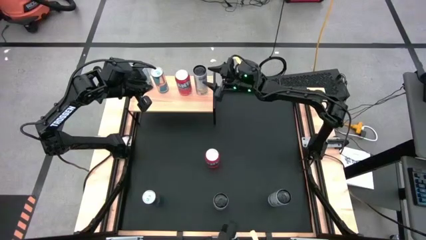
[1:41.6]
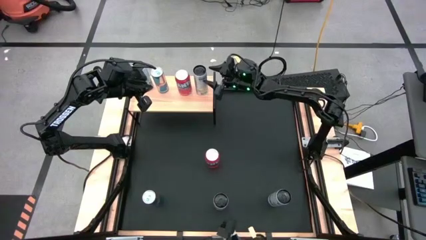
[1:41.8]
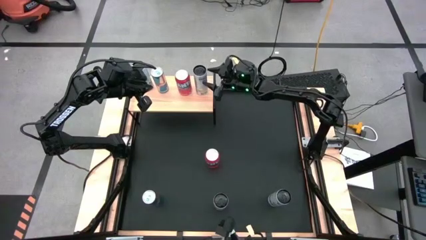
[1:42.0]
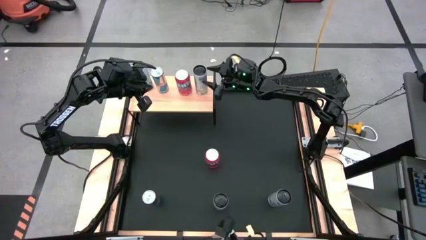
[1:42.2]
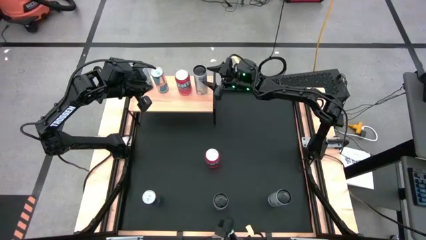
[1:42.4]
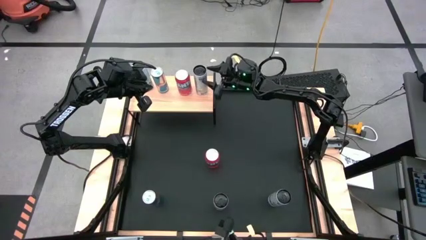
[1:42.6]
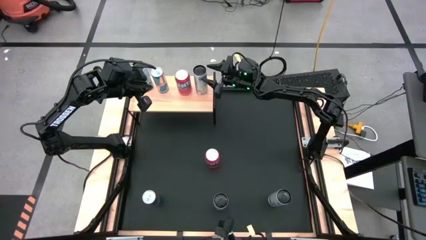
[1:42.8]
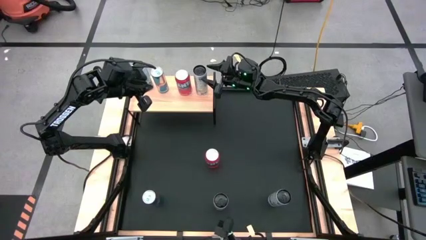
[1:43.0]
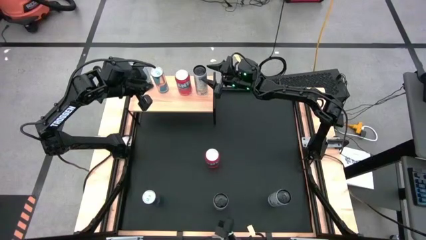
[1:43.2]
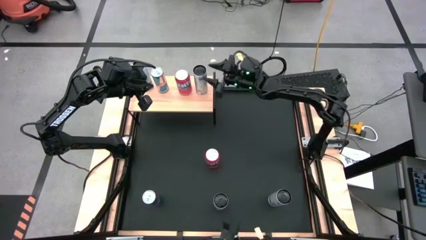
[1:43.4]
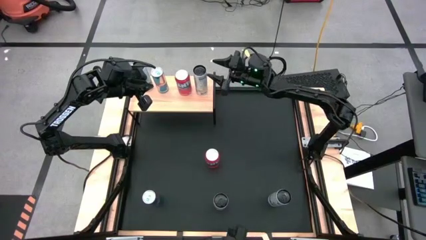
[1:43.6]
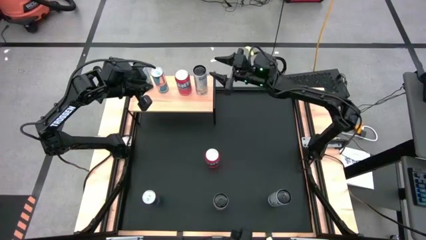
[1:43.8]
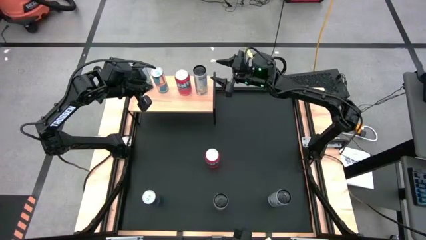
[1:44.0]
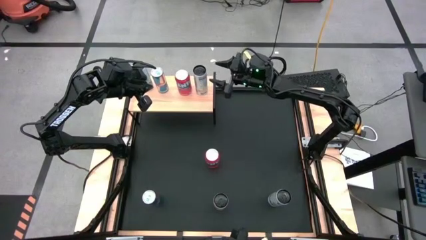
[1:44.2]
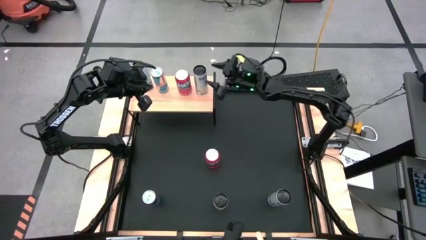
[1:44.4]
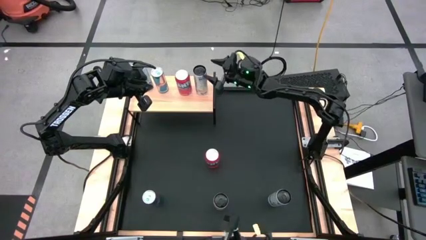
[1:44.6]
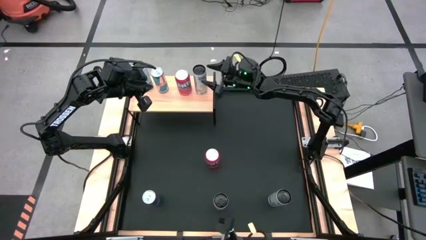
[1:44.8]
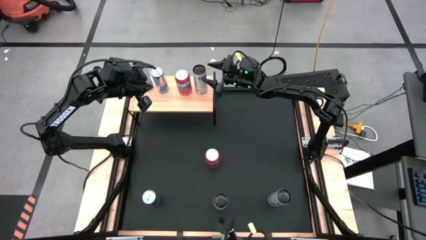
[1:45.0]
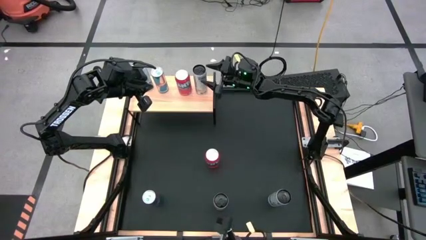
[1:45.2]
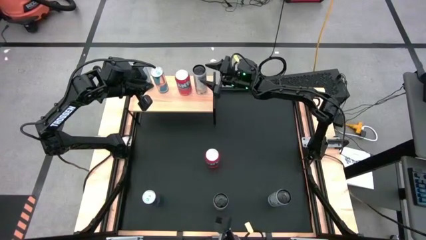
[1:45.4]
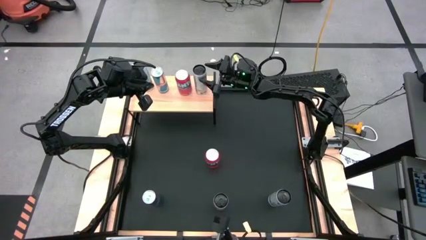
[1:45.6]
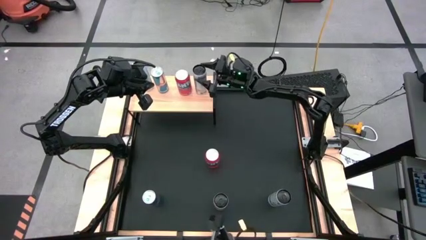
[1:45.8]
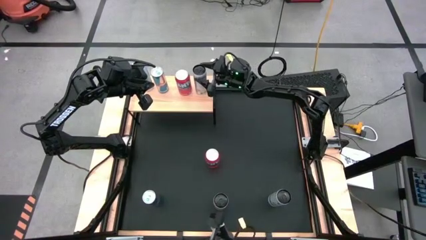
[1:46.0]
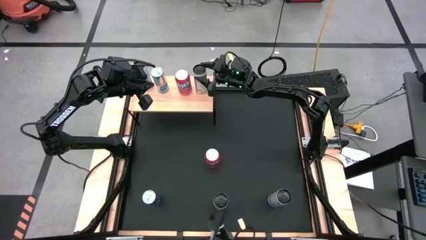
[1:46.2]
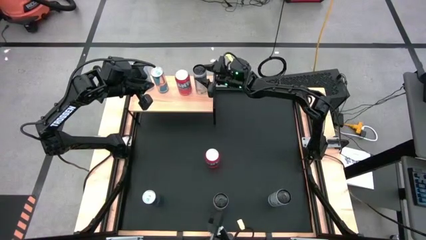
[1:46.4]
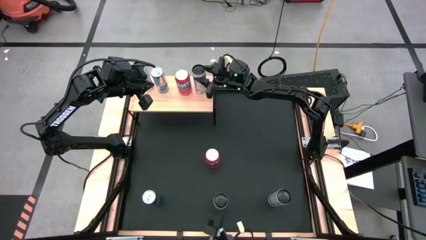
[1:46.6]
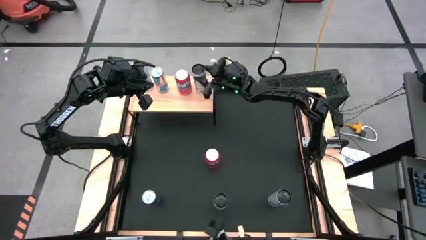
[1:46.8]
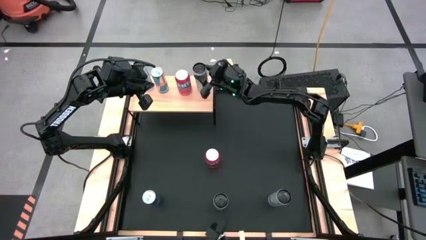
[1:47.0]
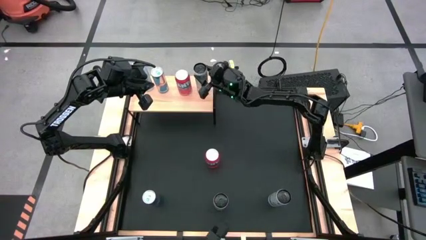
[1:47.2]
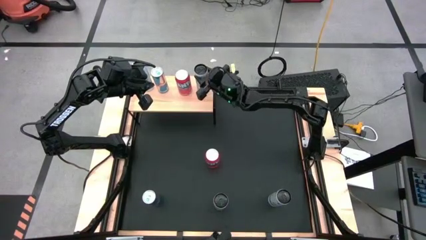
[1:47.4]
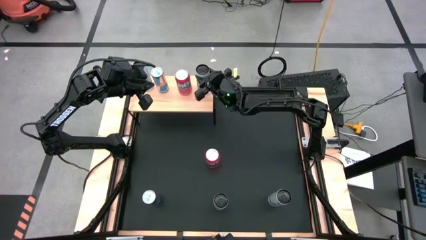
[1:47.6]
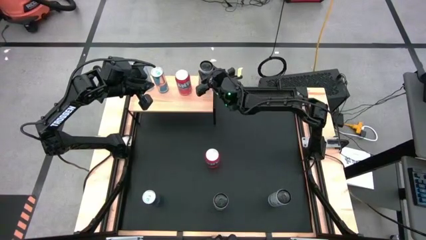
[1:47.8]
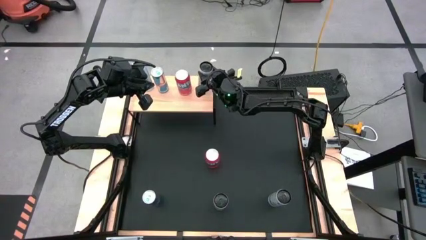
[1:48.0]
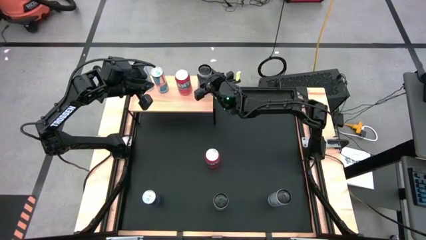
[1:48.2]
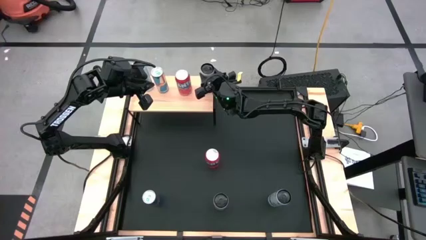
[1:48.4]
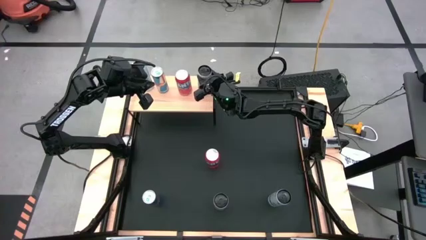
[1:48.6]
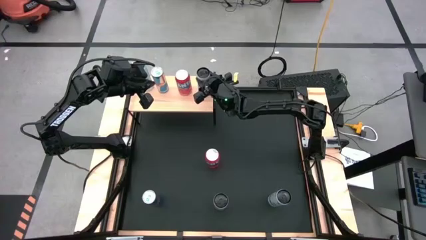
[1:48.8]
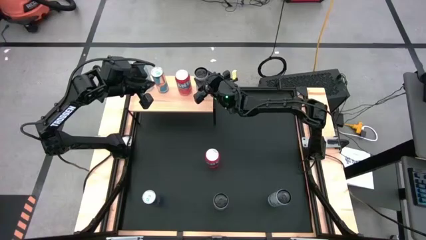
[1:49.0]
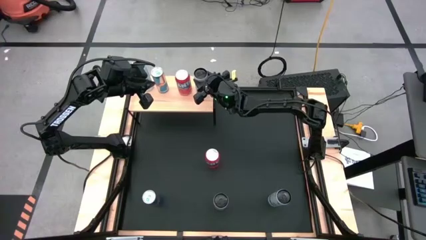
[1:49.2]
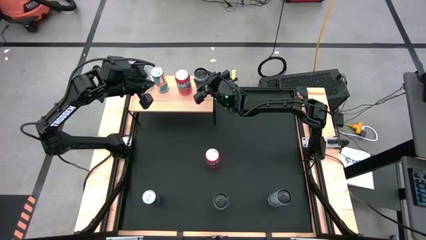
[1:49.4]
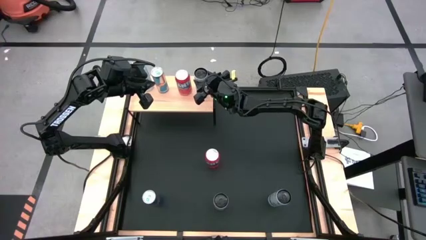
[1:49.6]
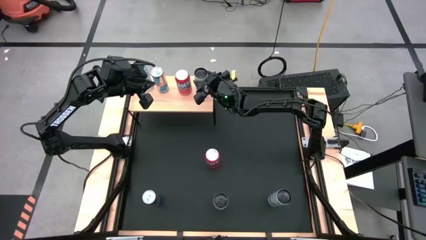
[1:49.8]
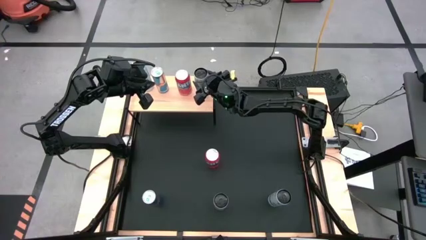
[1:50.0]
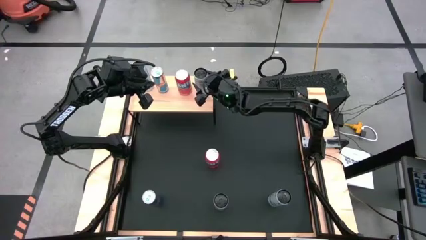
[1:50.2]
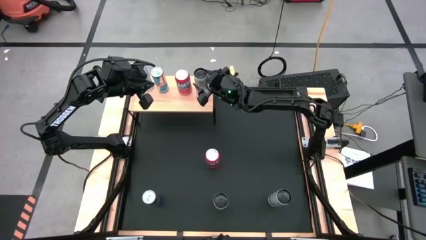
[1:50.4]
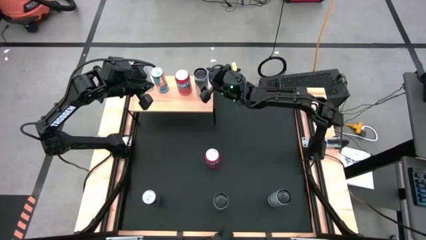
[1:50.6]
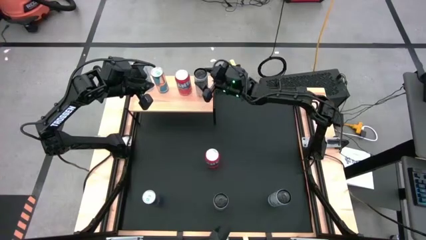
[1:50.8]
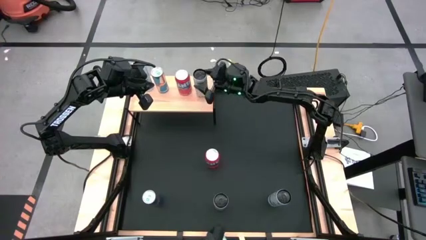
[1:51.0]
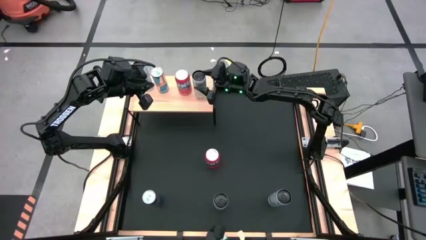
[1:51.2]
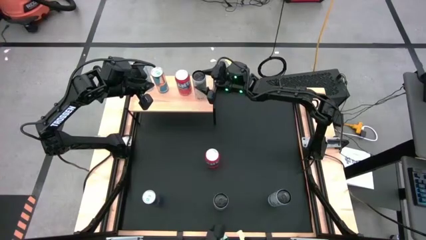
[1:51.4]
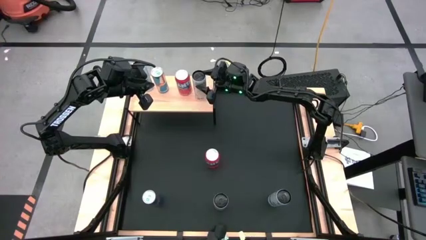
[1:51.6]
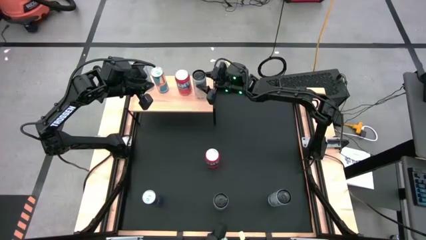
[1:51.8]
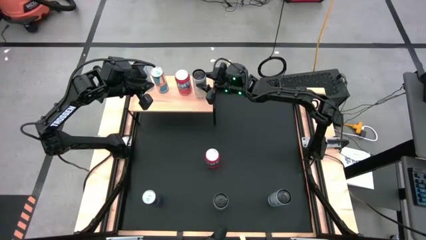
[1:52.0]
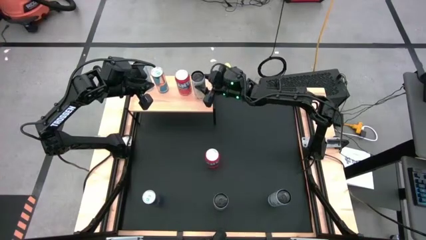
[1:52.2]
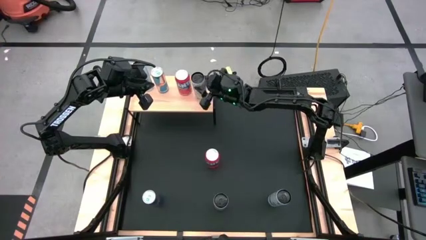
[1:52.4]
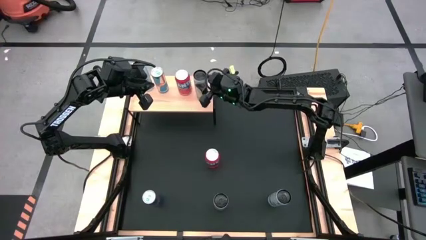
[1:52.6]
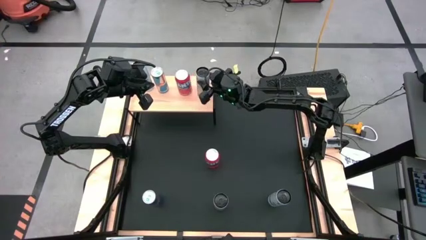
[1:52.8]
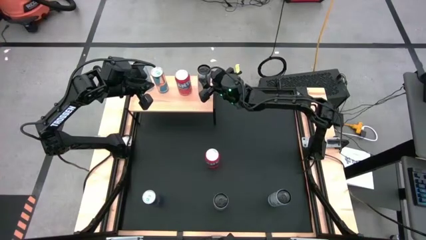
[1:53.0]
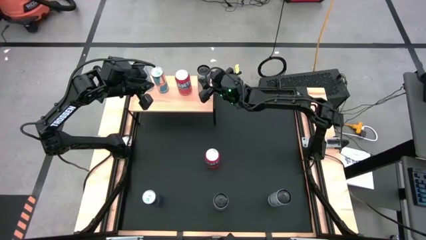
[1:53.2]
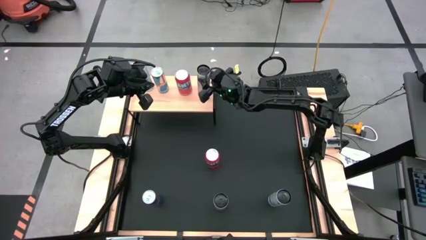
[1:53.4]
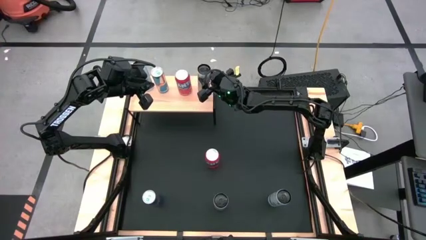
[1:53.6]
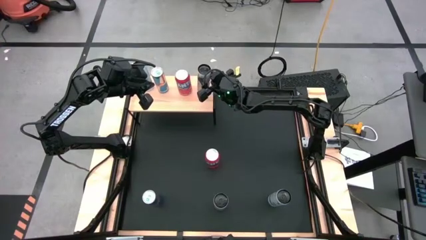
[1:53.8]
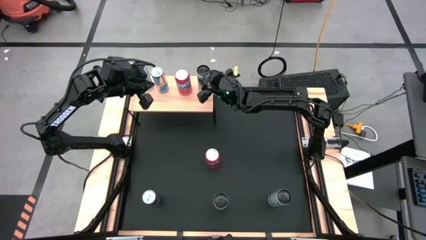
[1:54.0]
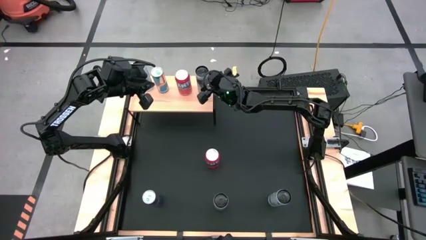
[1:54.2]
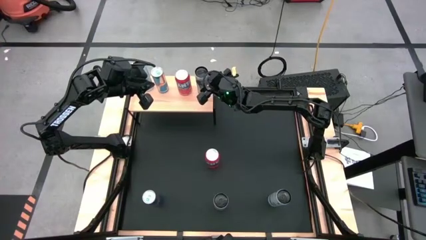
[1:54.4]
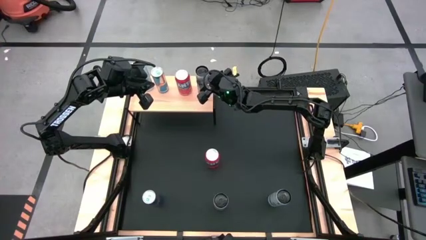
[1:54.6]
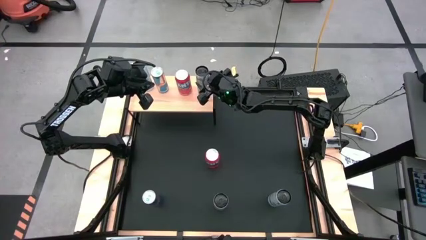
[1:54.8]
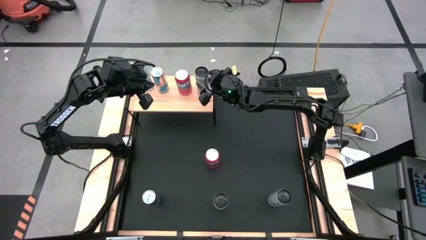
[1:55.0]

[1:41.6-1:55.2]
Task: Place canned beverage on shelf
Put the top white-yellow soda can on the shelf
